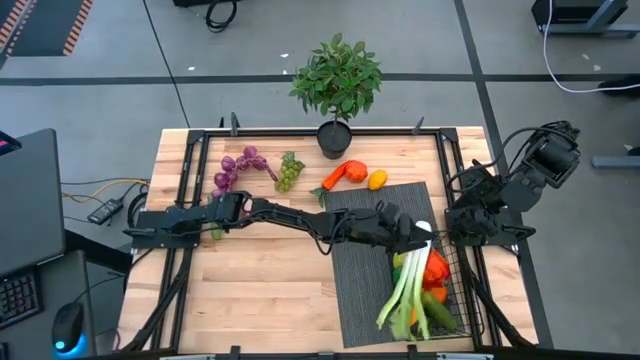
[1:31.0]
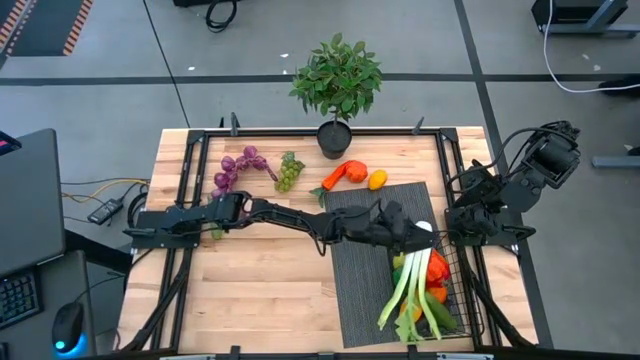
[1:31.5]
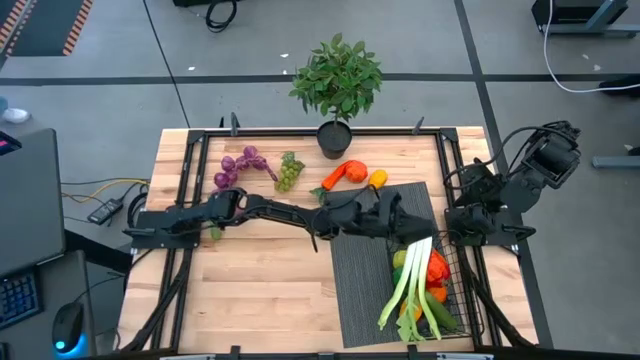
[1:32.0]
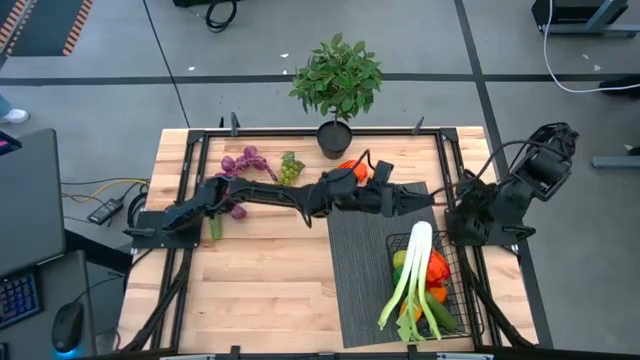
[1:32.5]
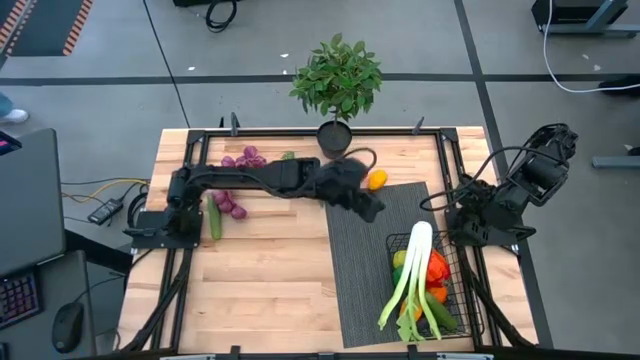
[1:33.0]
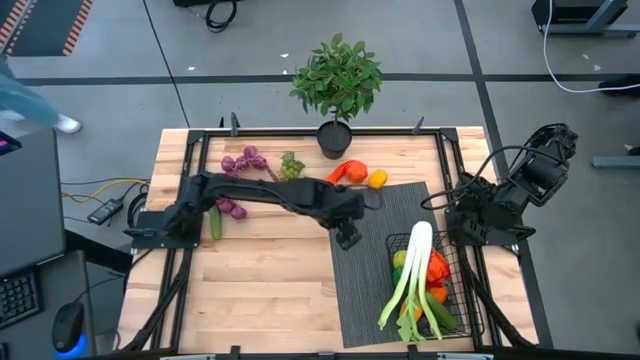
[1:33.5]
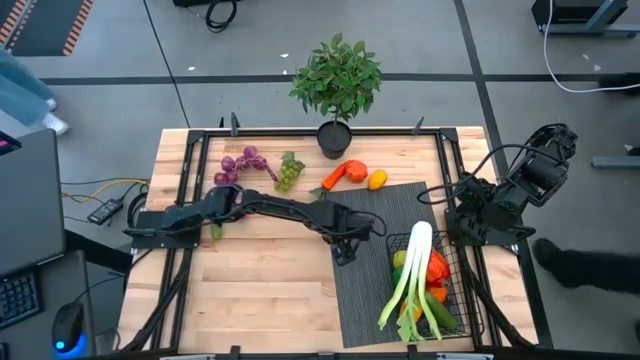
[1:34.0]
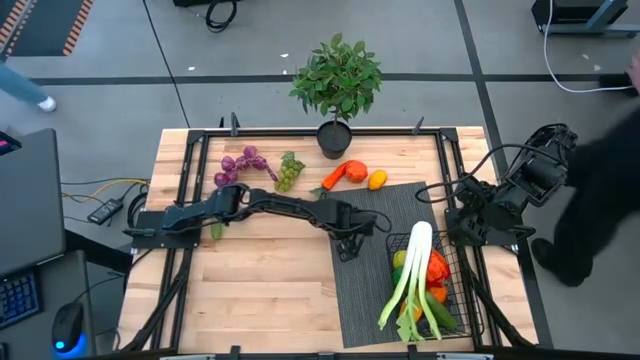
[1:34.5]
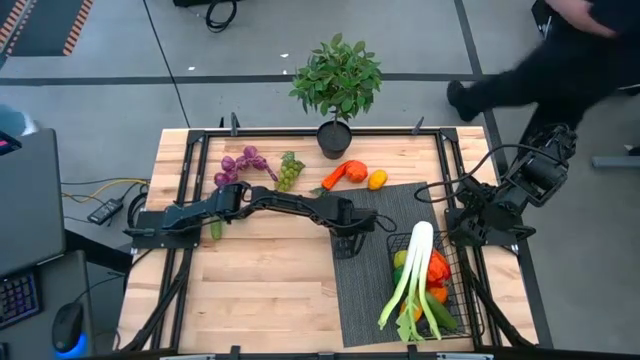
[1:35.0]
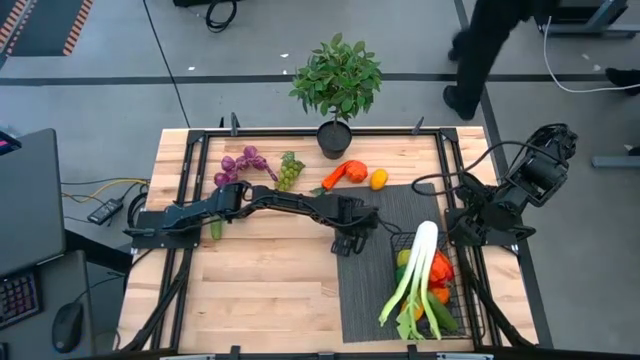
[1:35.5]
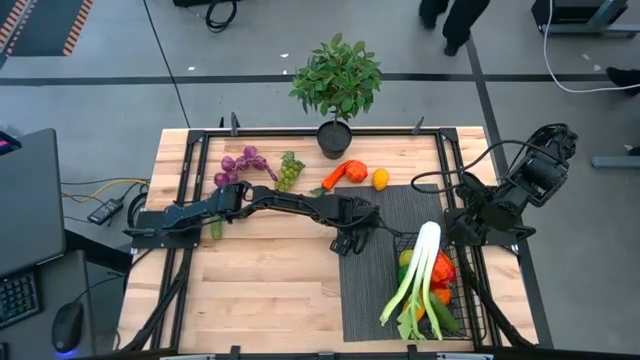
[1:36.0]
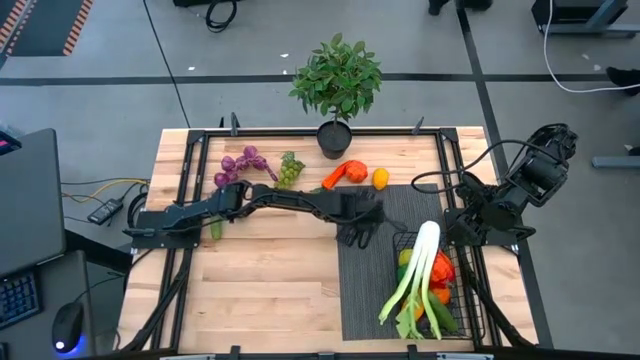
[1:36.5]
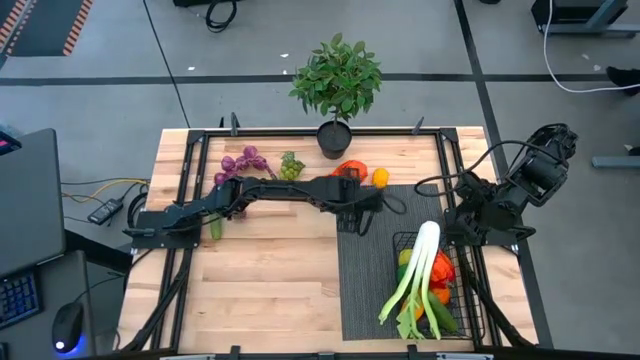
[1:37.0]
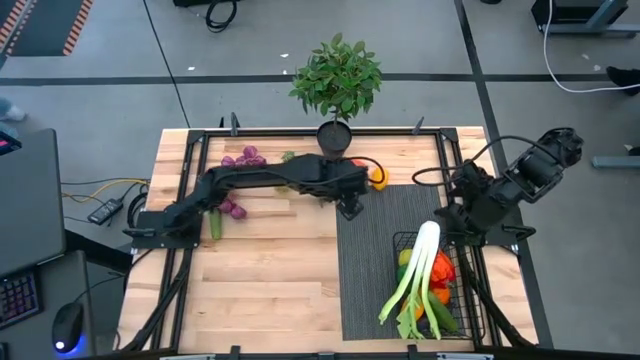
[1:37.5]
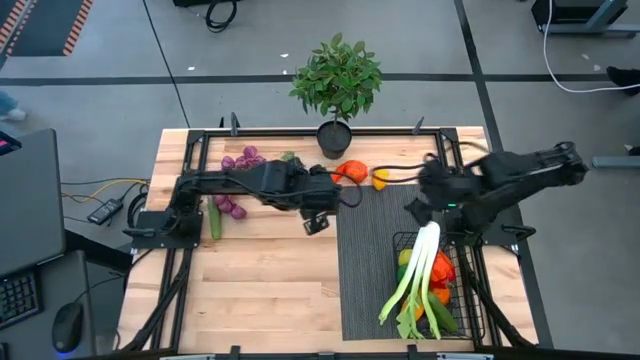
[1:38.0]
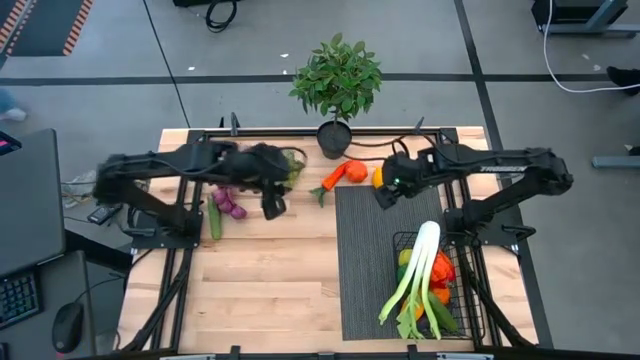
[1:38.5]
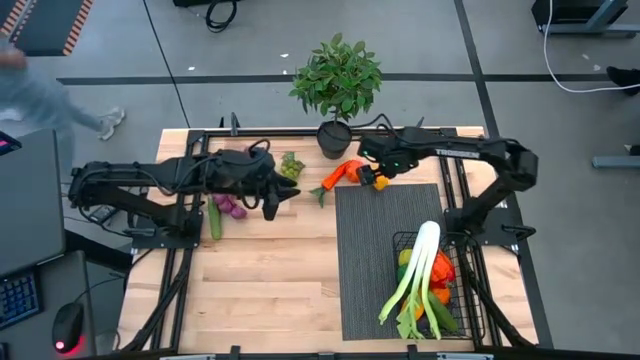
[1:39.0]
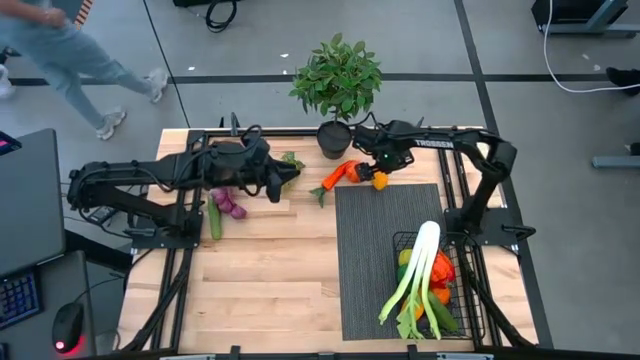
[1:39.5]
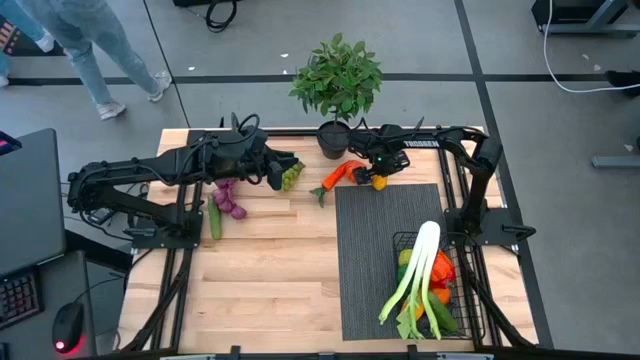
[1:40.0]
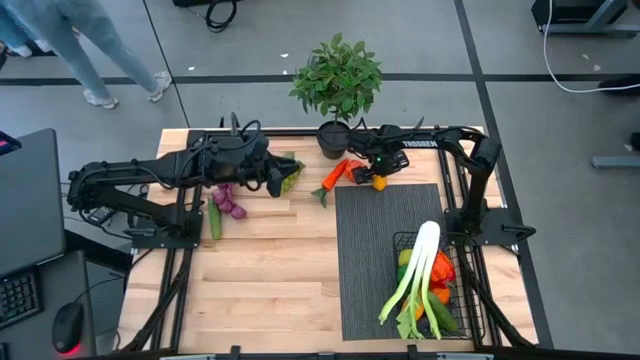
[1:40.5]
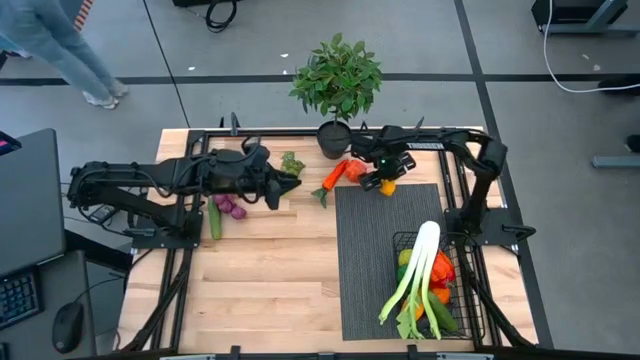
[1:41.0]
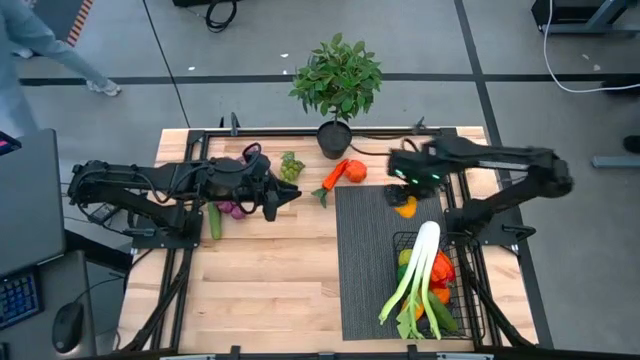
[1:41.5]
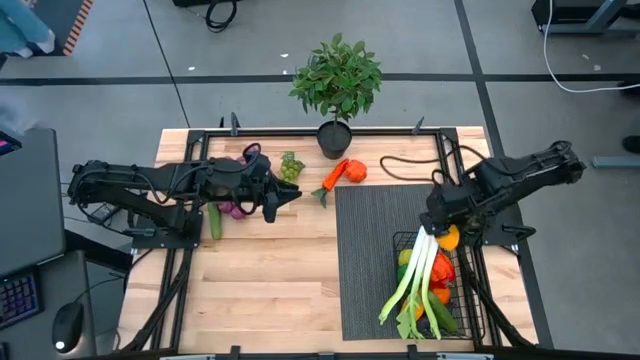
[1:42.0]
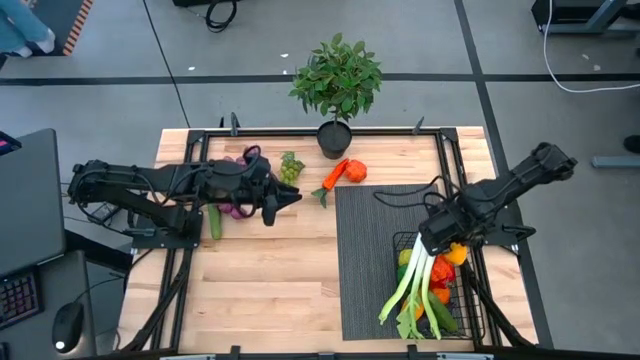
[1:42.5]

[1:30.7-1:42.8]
Task: Build produce basket
Put the mango into the black wire basket

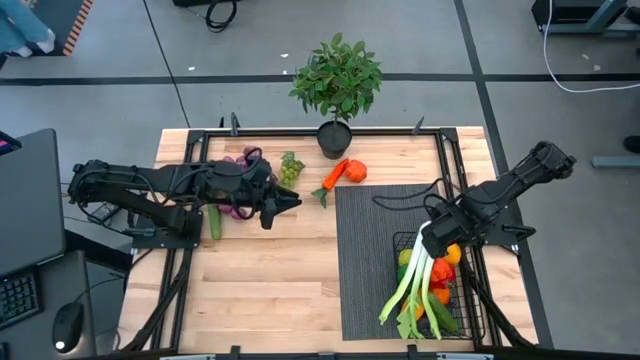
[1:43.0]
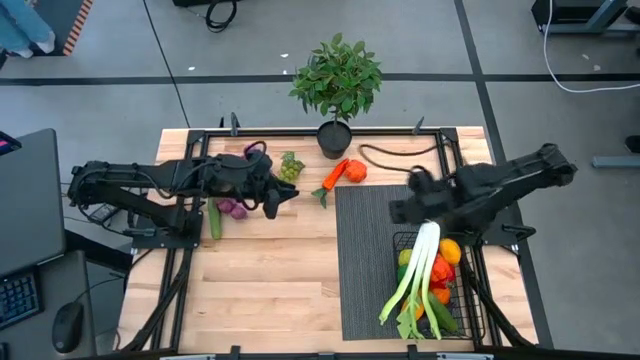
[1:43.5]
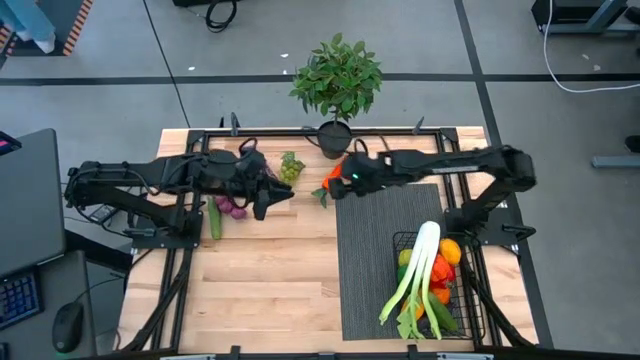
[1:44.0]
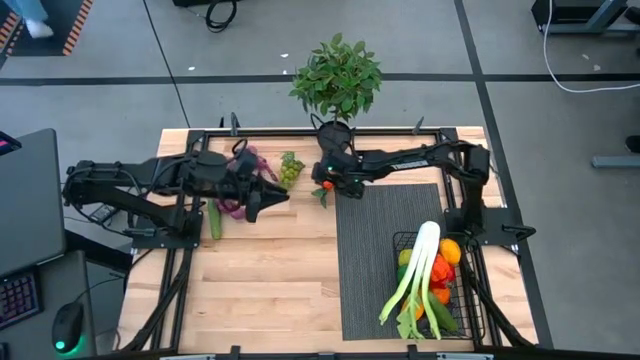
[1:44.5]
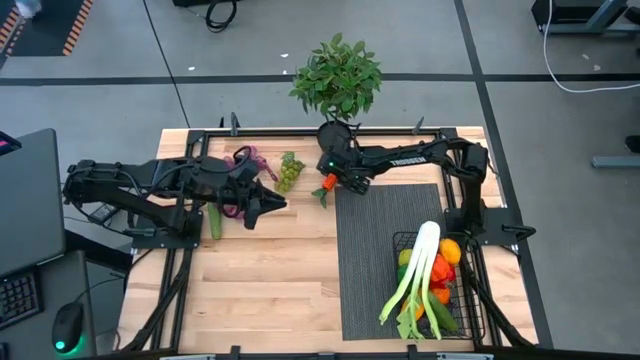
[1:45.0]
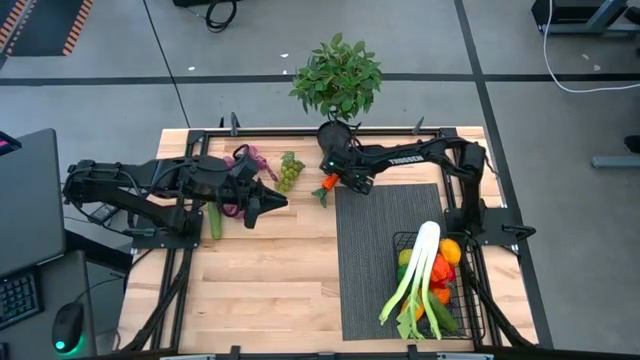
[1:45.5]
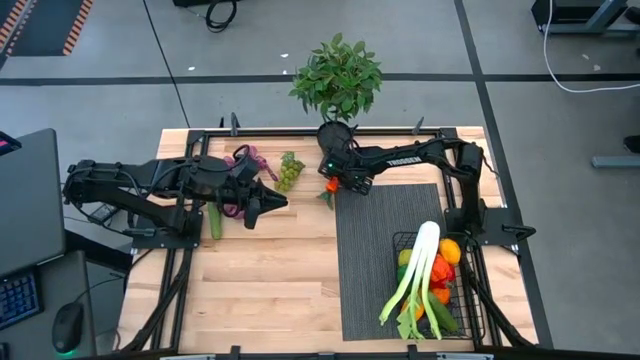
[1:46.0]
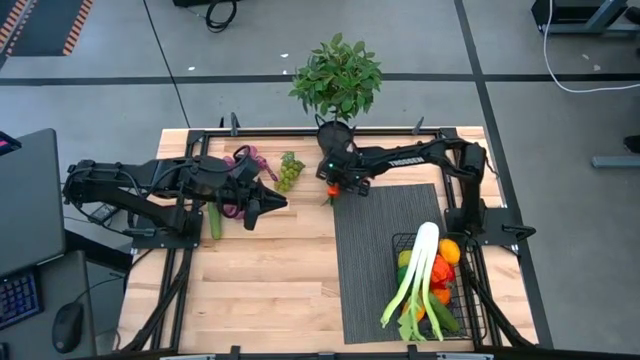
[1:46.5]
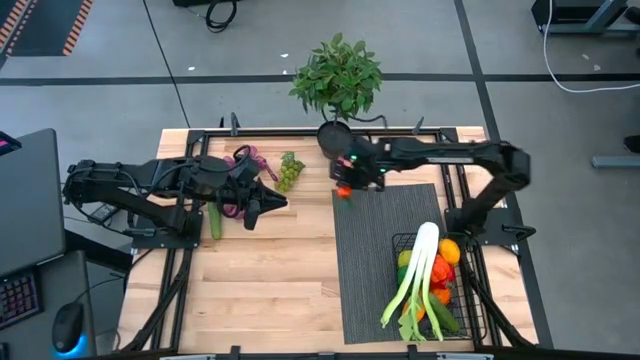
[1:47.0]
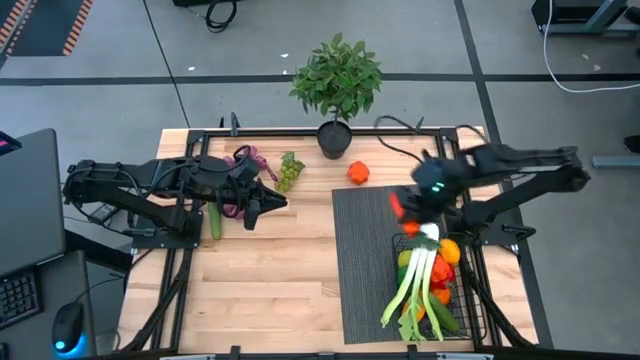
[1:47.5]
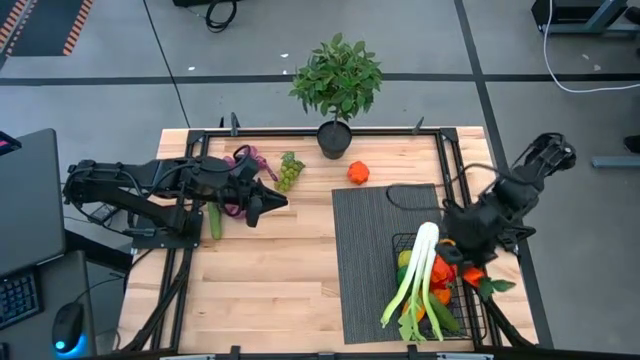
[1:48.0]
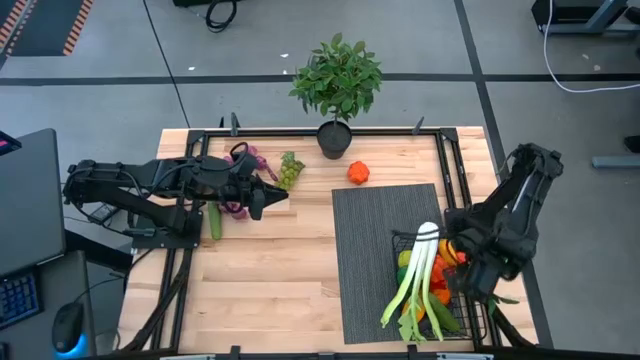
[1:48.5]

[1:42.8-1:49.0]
Put the carrot into the black wire basket

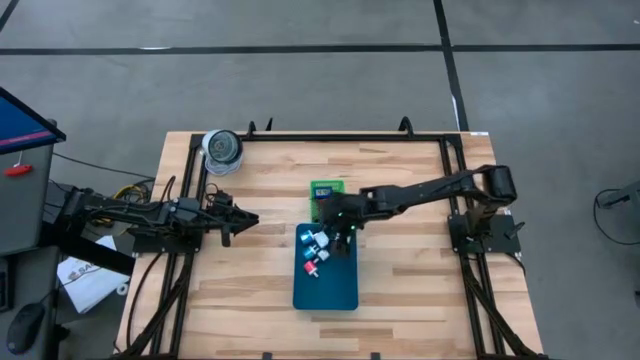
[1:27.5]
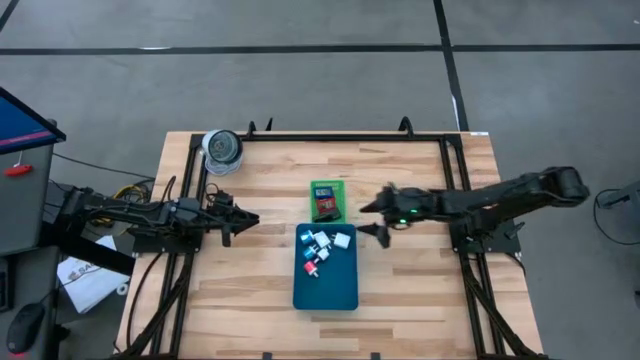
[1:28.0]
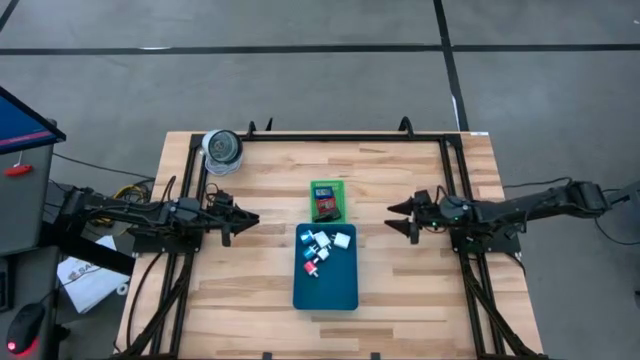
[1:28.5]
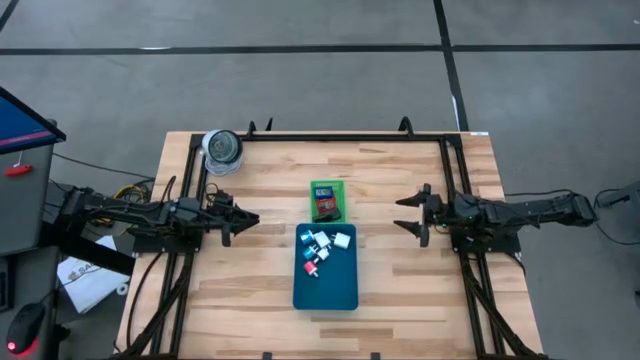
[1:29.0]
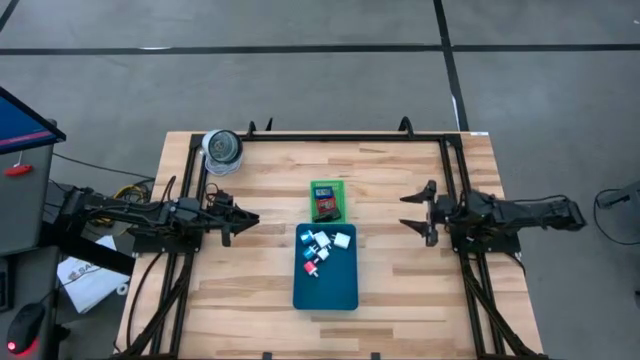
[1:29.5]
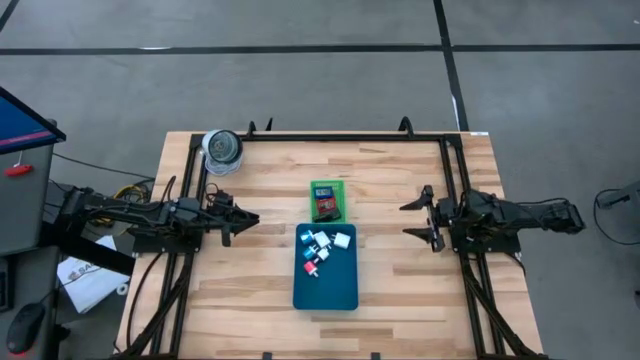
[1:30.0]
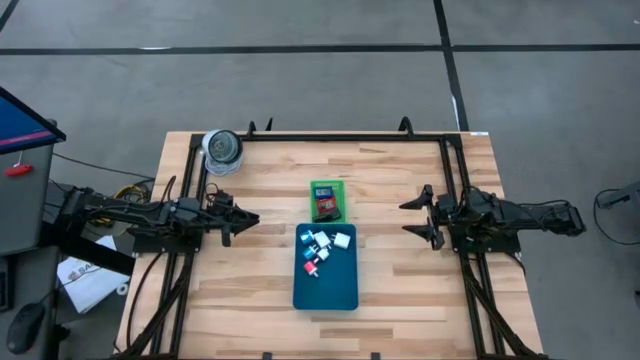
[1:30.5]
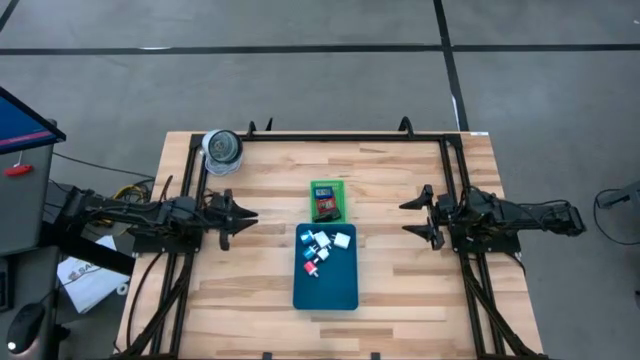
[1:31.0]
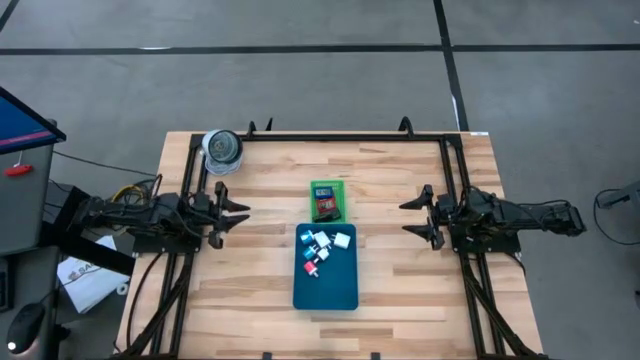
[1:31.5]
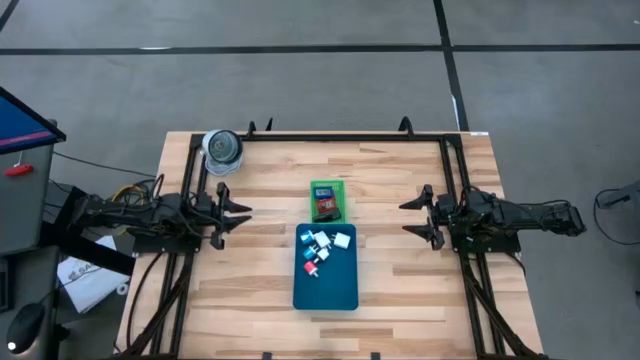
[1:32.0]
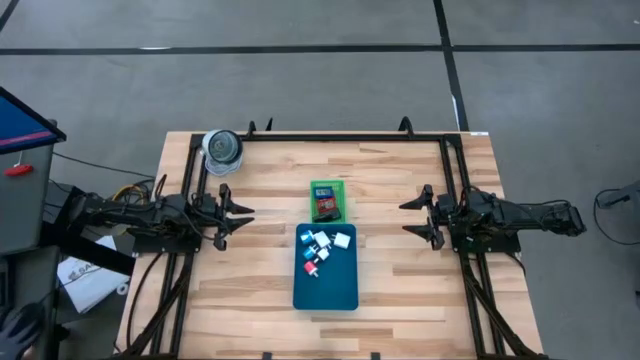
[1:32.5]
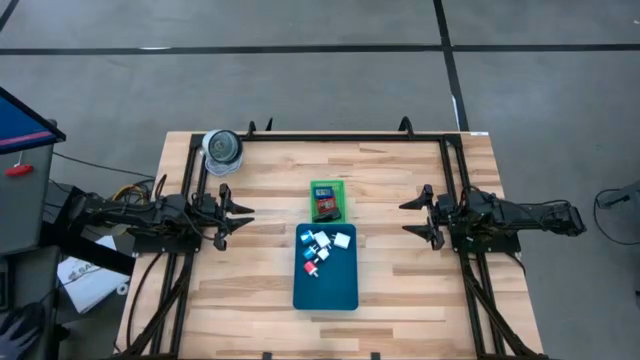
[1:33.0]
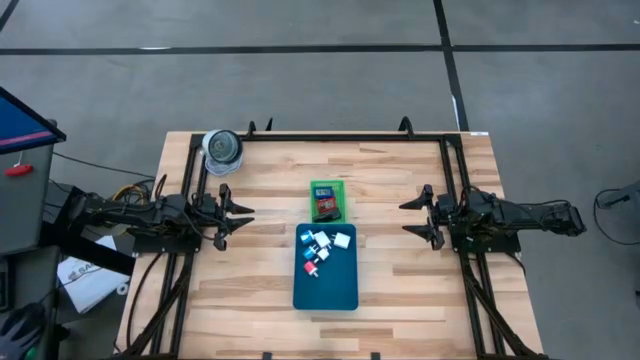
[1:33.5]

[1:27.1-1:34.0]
Task: Pick & Place Office items
Return to Home Position
